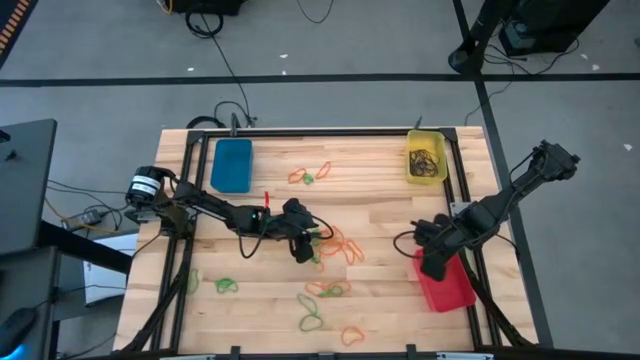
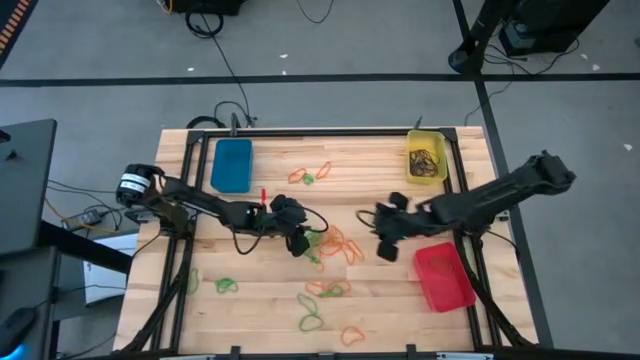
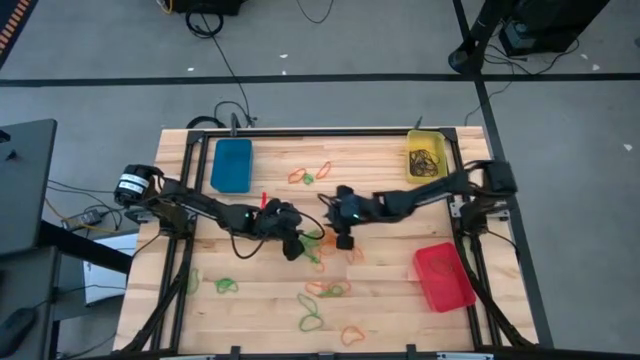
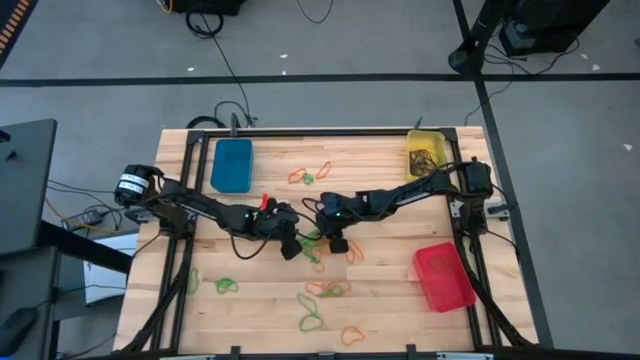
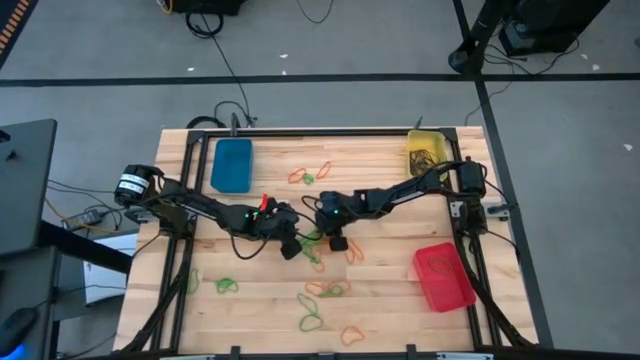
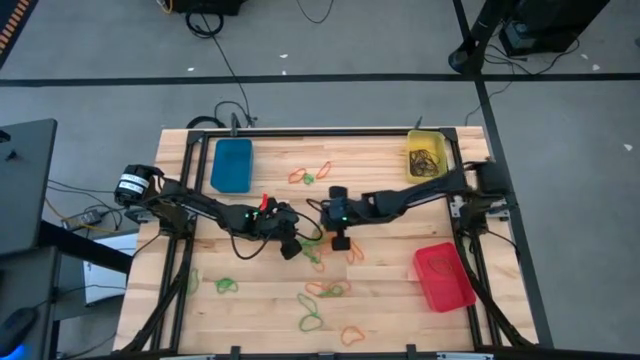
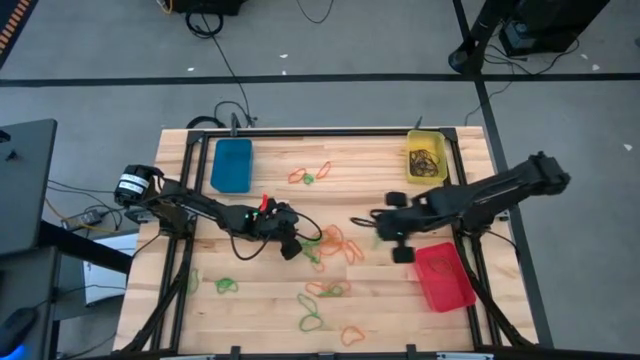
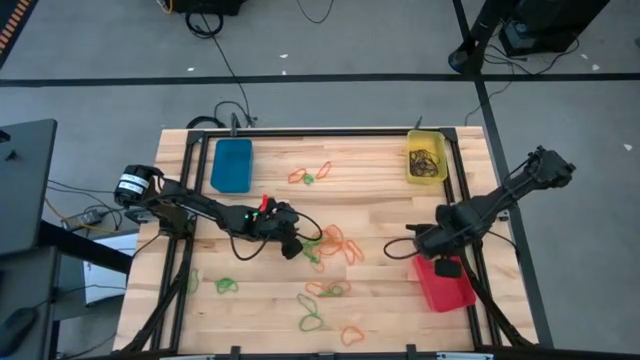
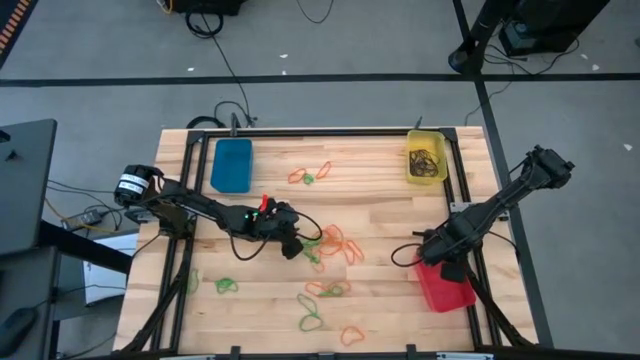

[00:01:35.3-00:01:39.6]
Task: Sort rubber bands into baskets
Put the green rubber band into the red bin

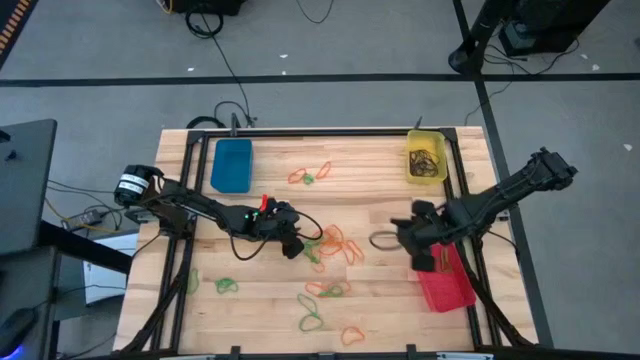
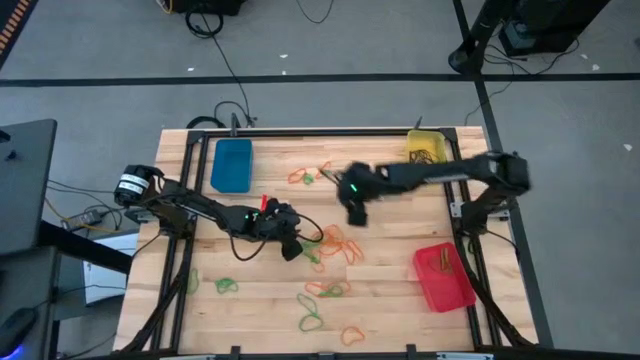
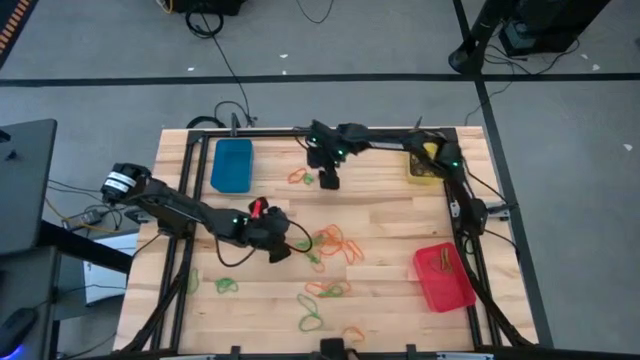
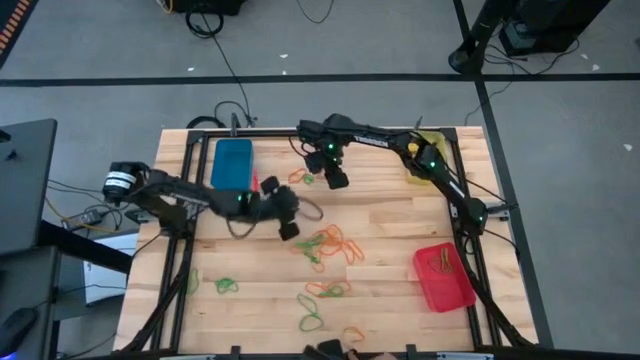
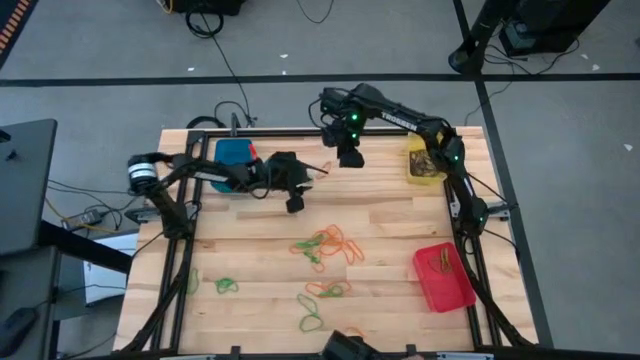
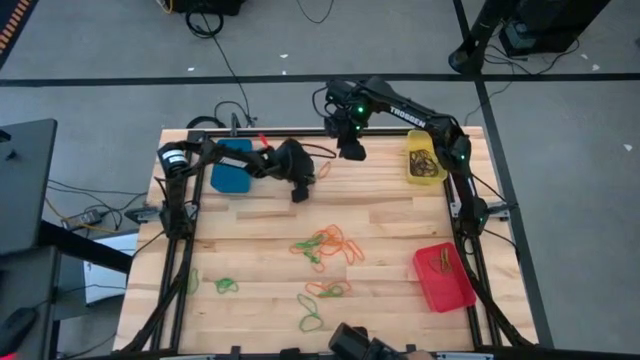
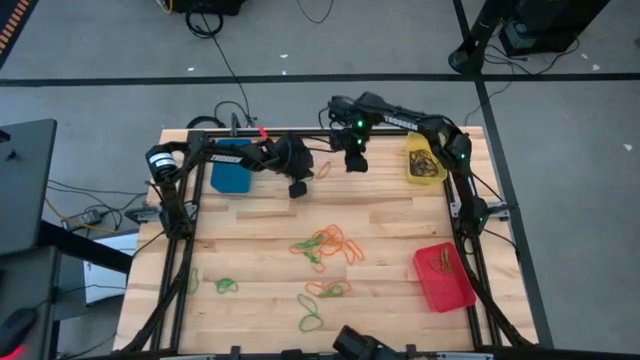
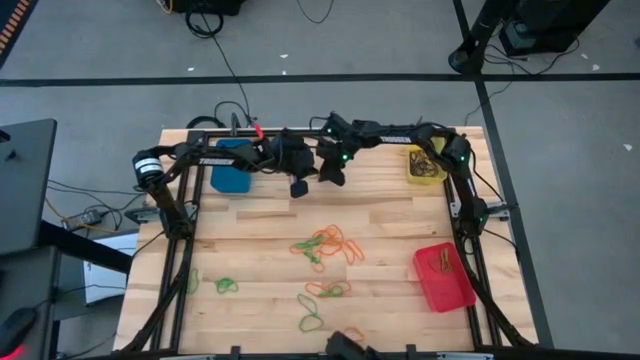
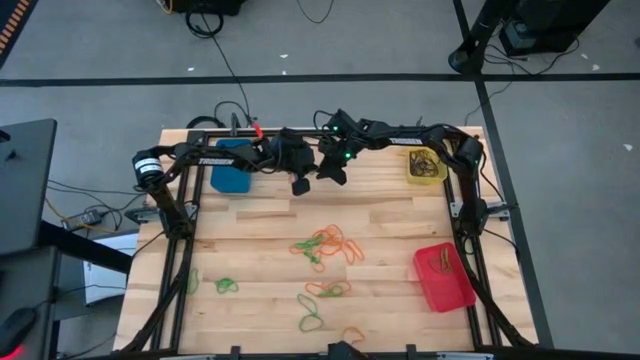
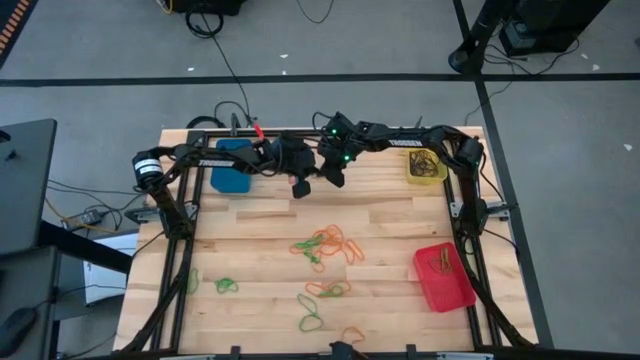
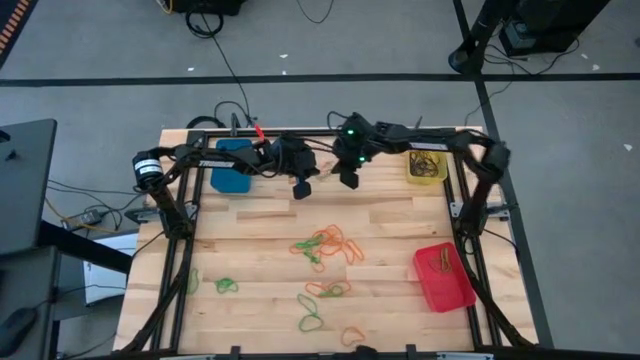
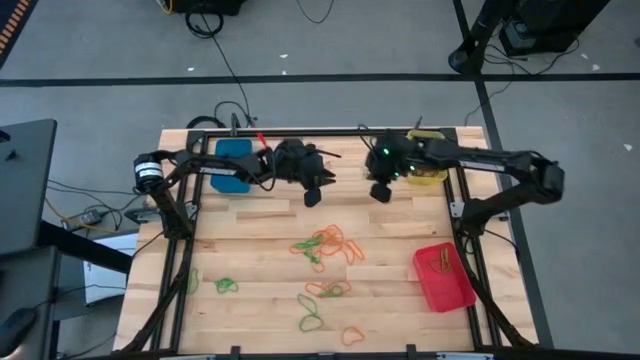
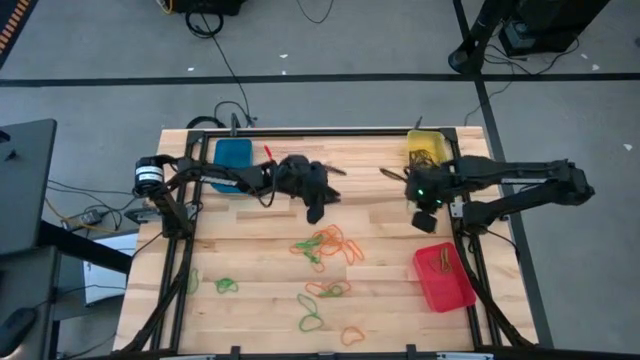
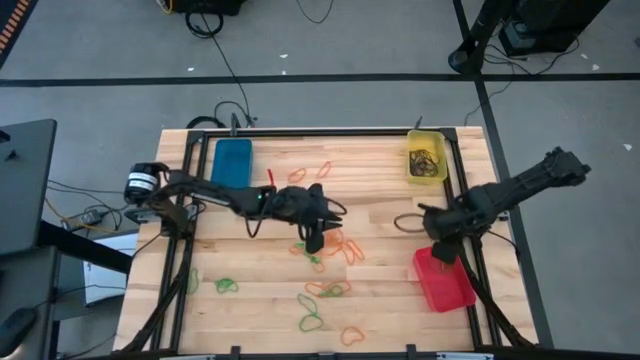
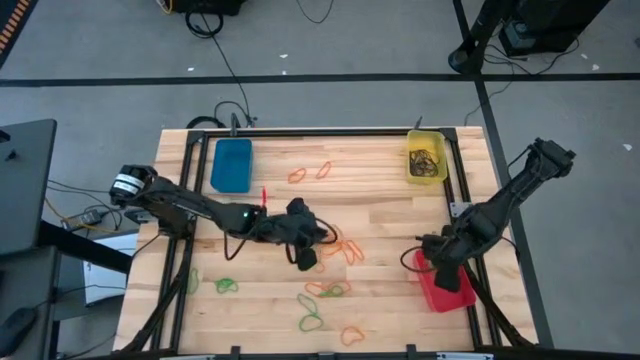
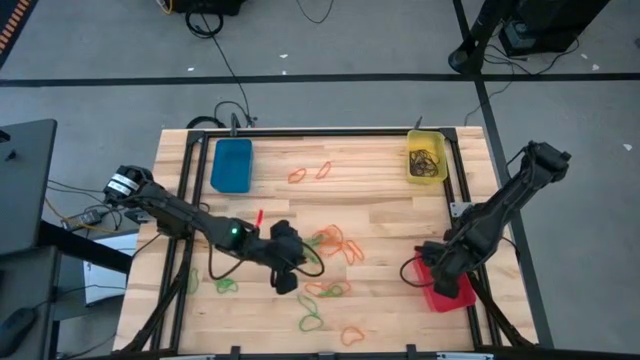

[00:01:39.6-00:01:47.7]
Put the green rubber band into the red bin

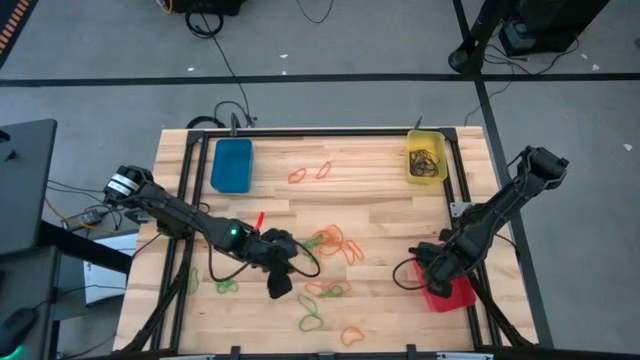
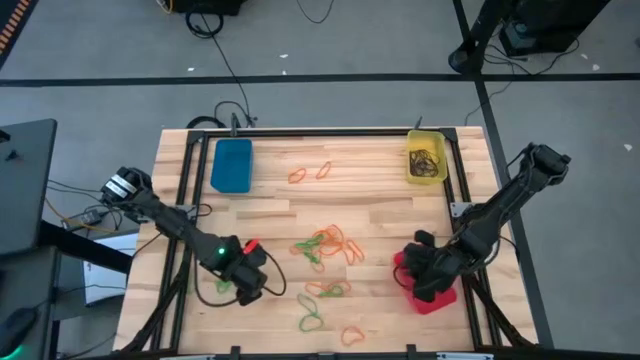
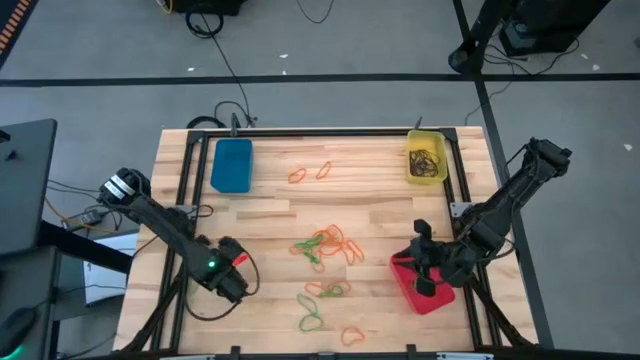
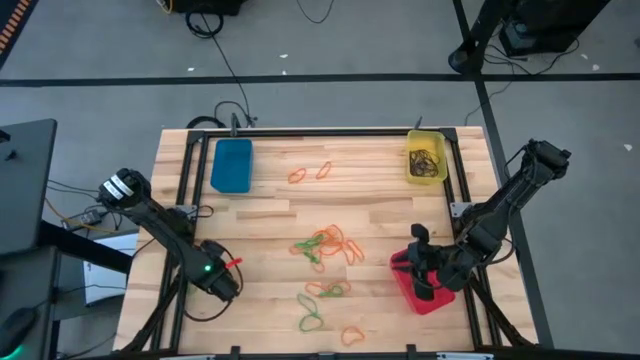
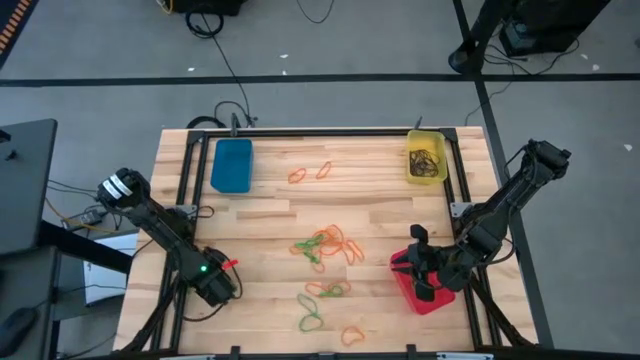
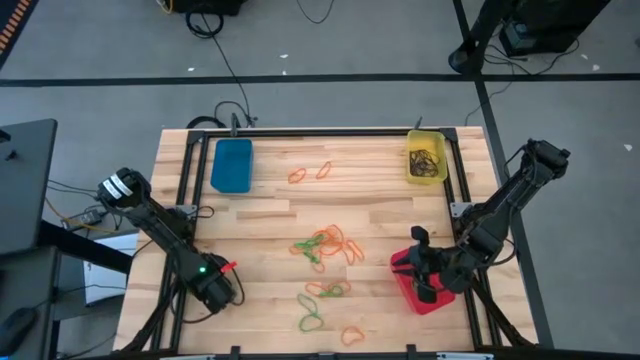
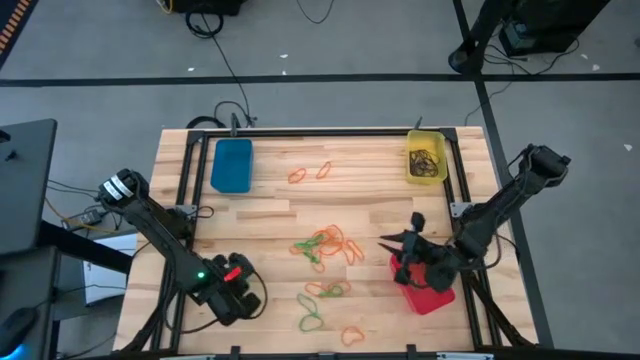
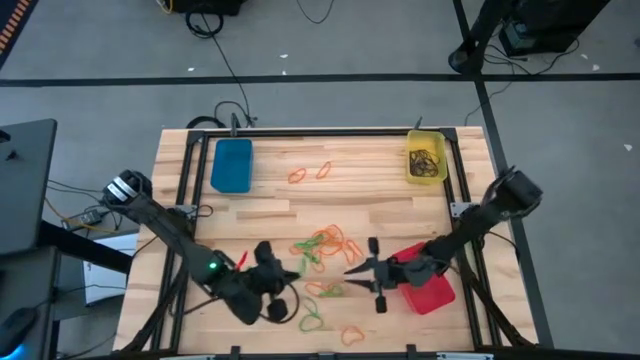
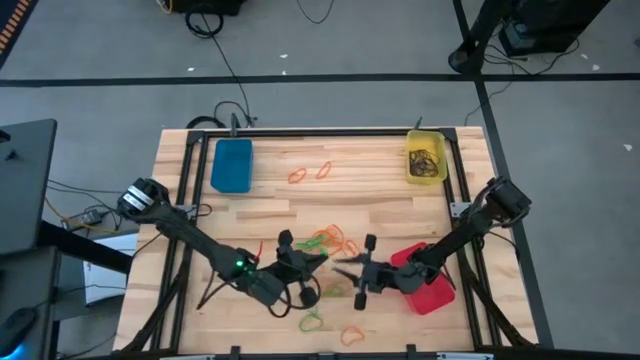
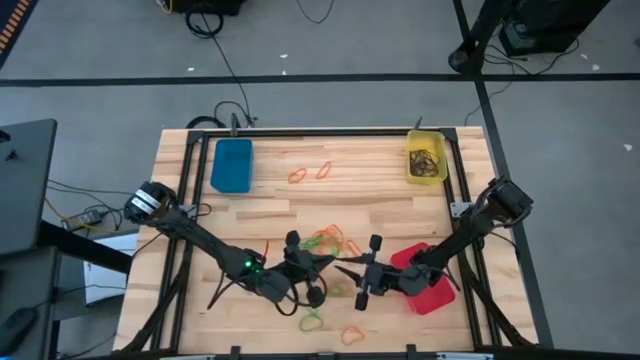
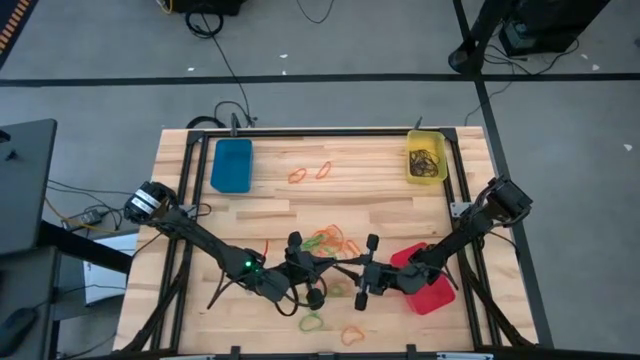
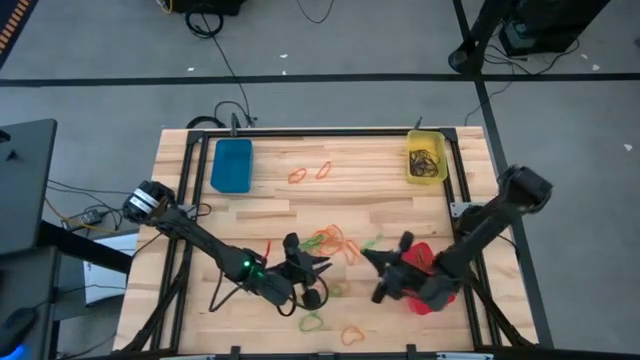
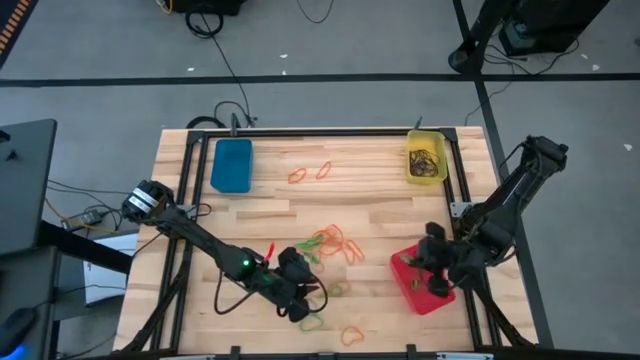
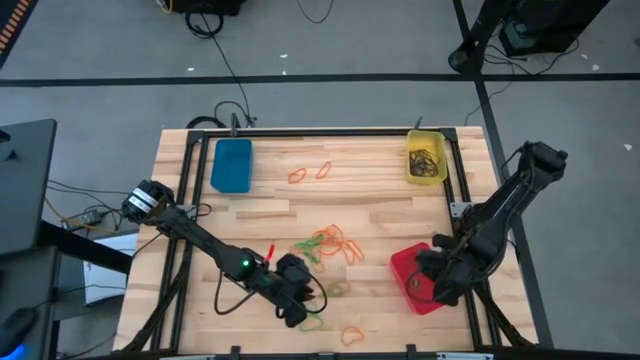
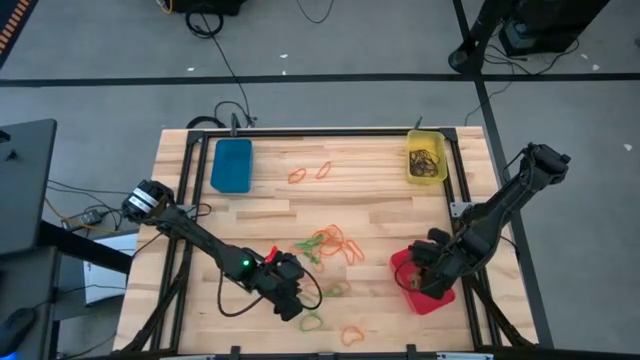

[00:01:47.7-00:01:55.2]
Put the green rubber band into the red bin

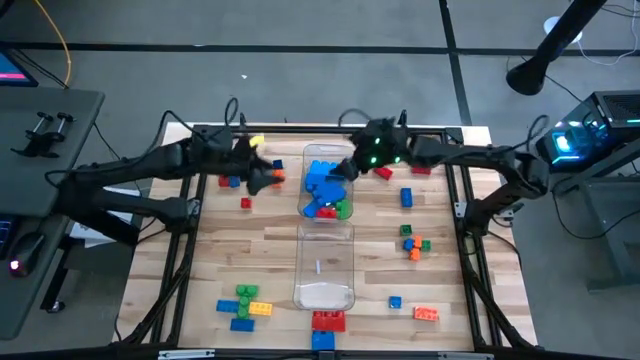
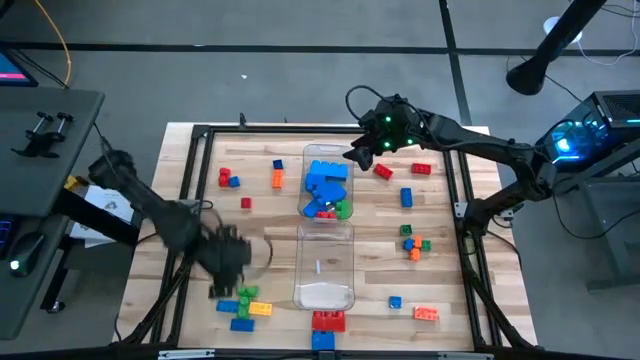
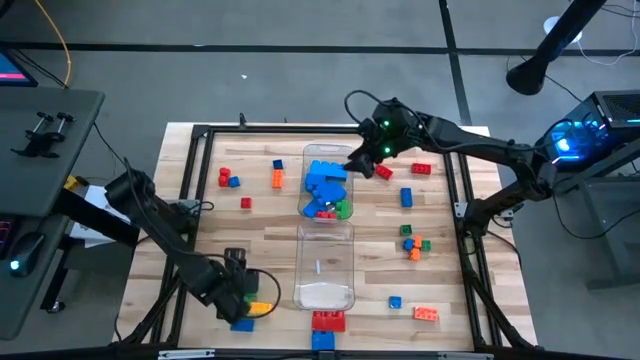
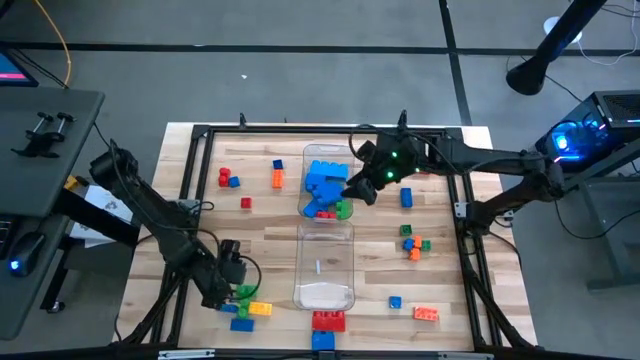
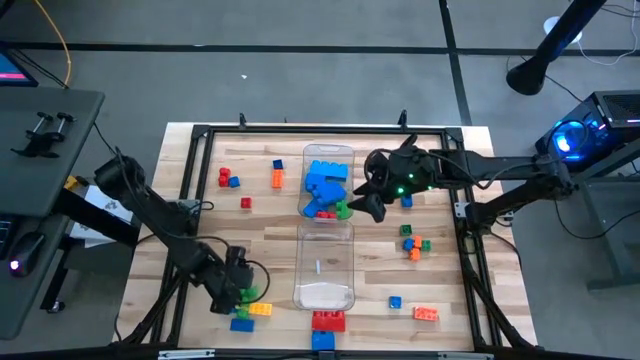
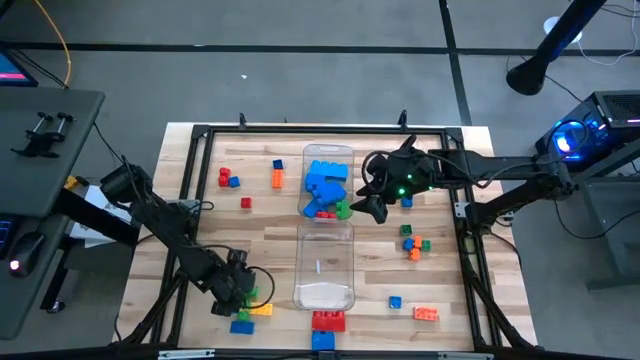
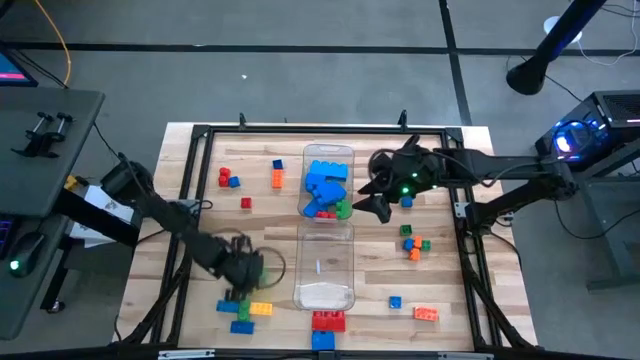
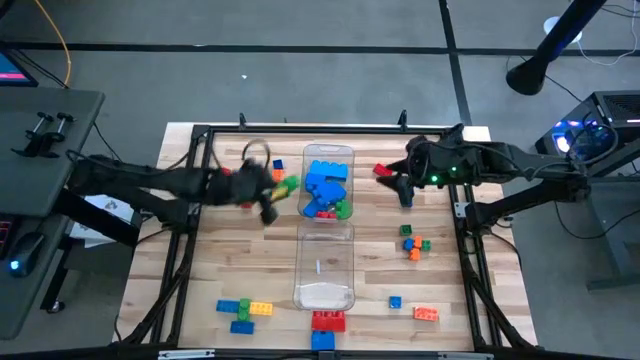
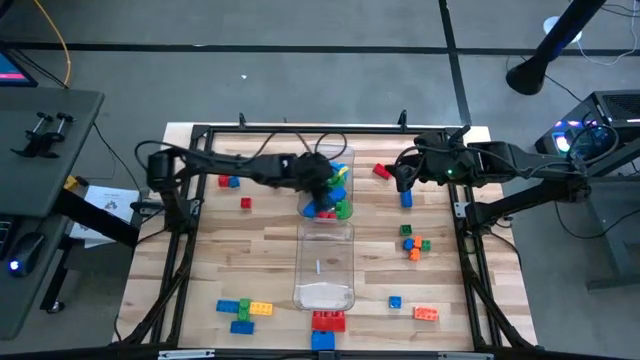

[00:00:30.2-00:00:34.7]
Task: Sort blocks by size
Put the large green game piece in the top transparent bin
